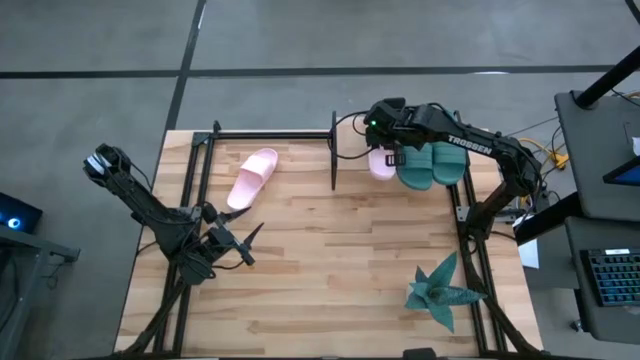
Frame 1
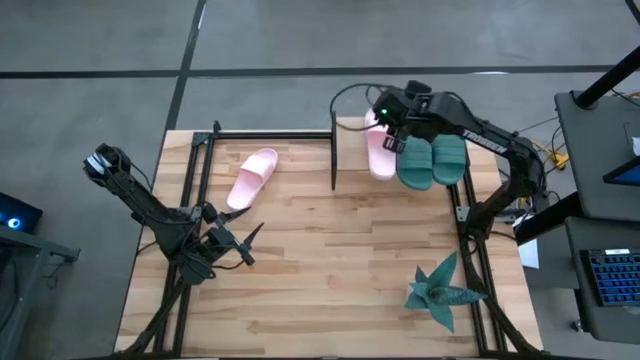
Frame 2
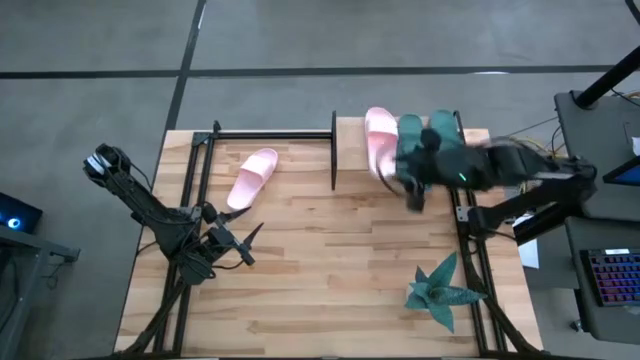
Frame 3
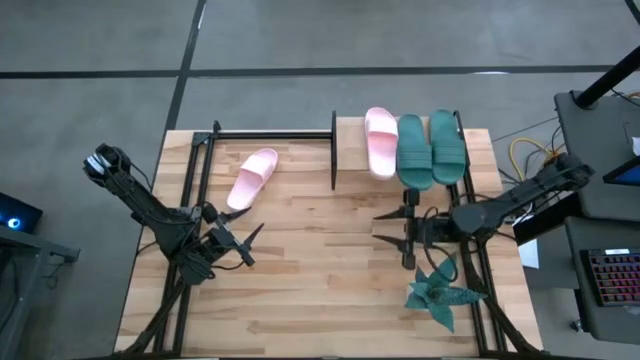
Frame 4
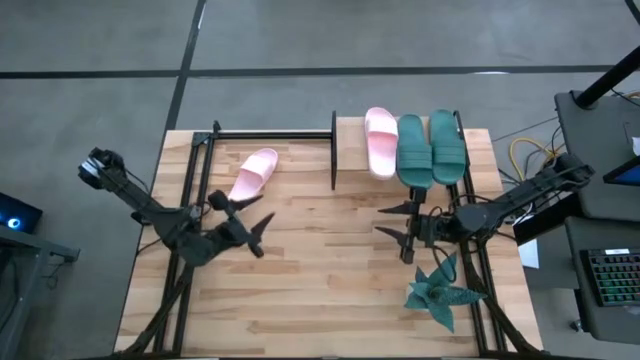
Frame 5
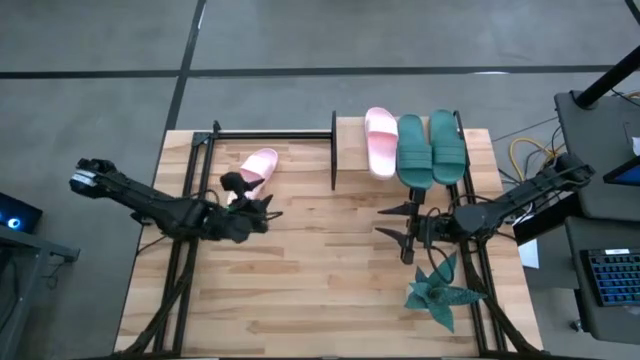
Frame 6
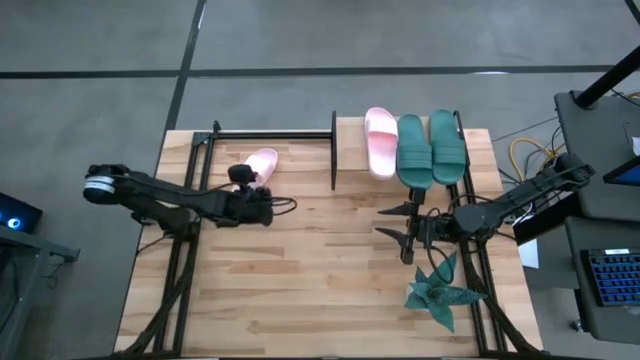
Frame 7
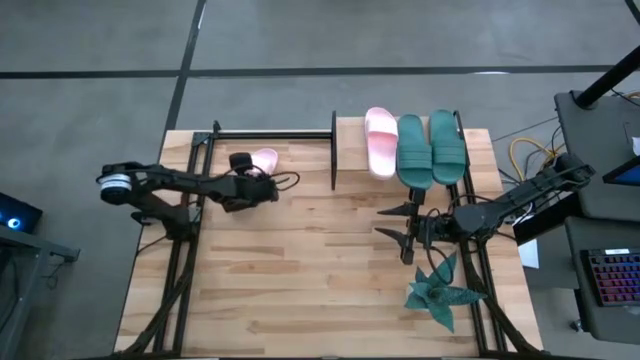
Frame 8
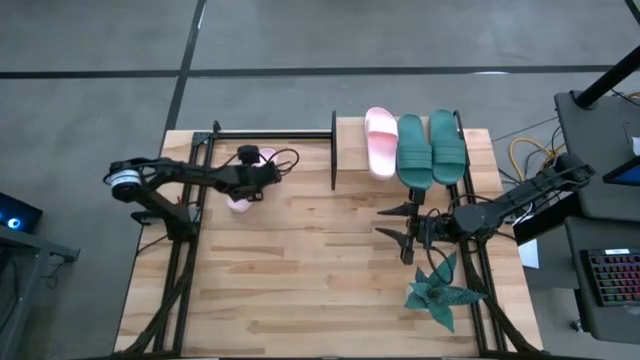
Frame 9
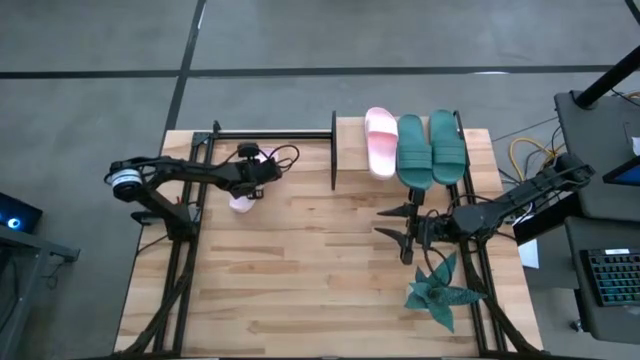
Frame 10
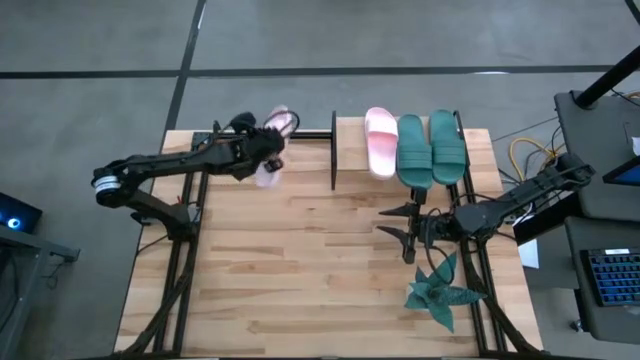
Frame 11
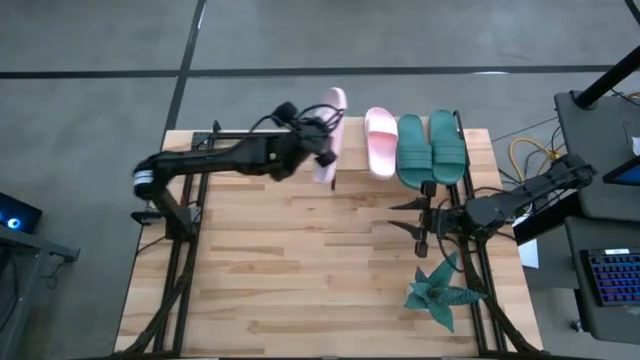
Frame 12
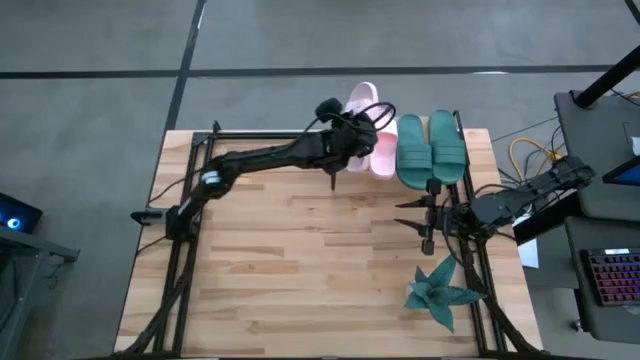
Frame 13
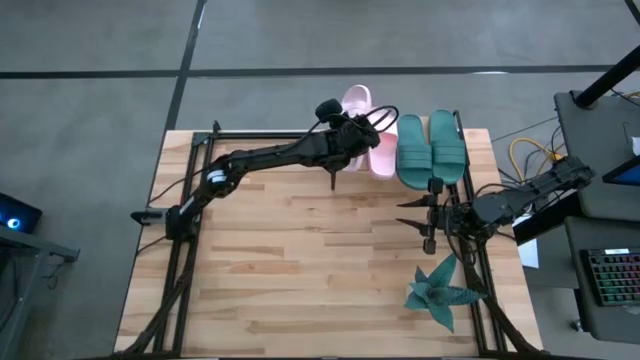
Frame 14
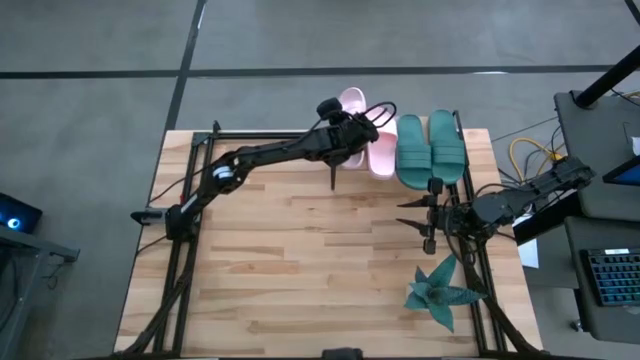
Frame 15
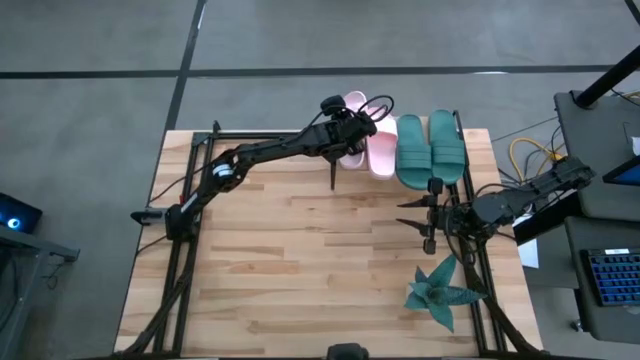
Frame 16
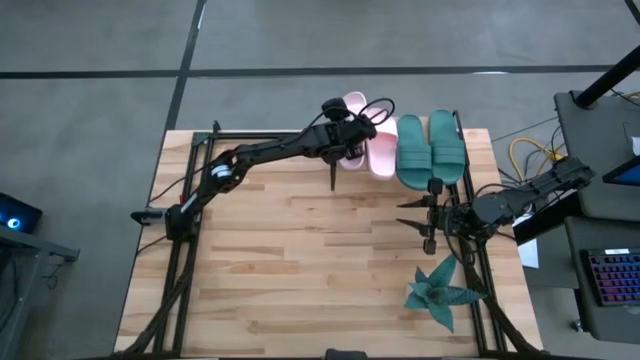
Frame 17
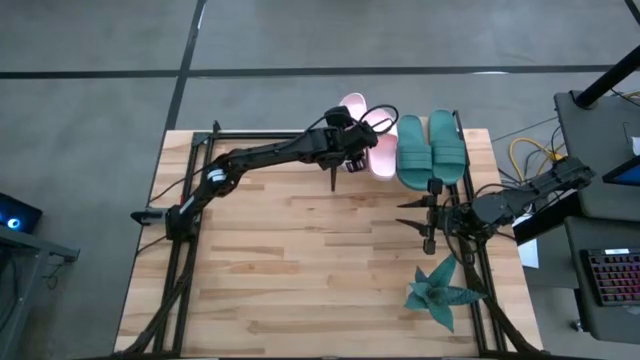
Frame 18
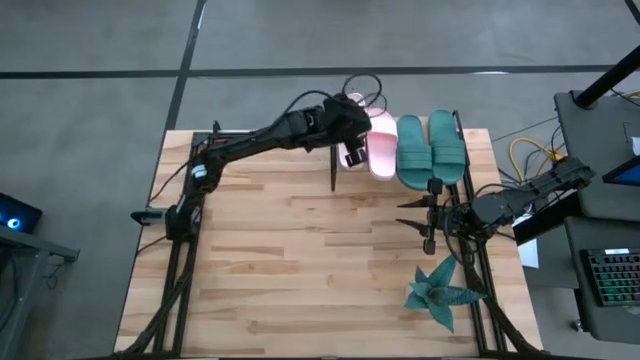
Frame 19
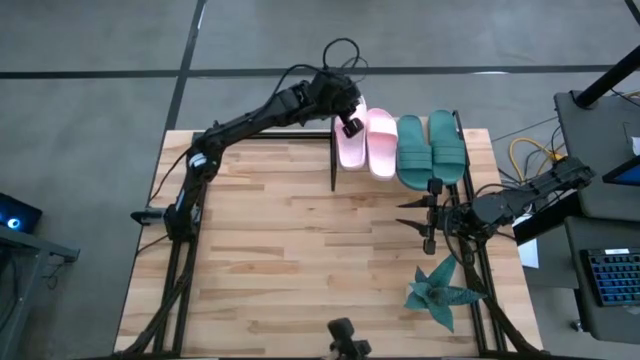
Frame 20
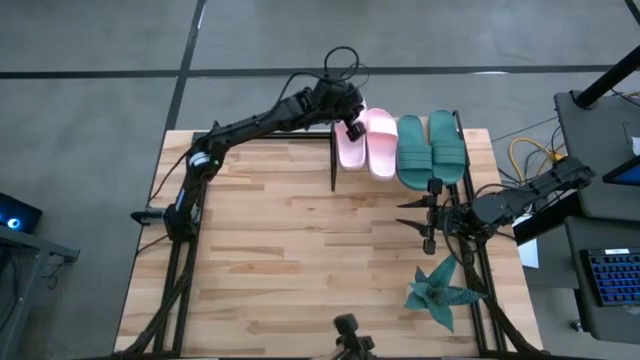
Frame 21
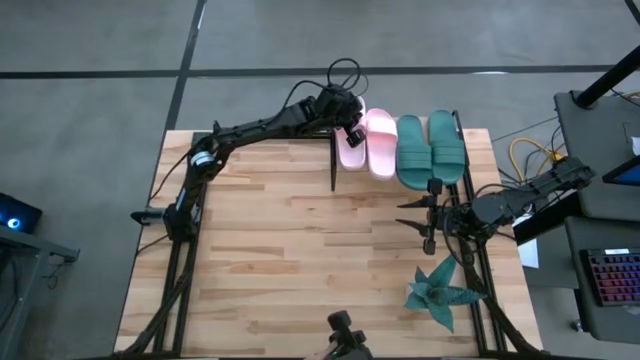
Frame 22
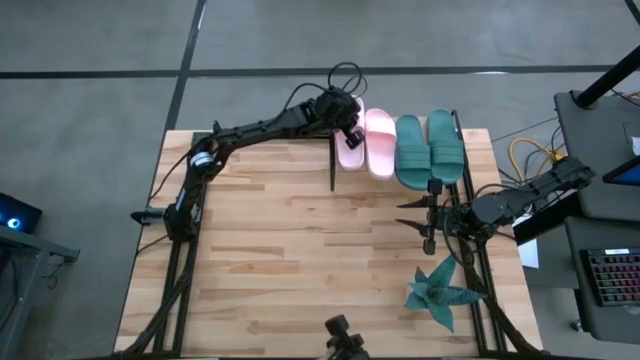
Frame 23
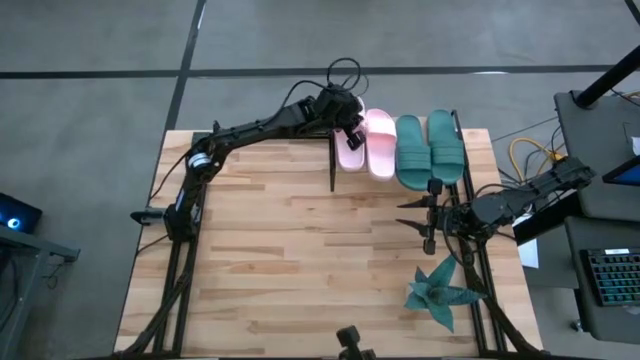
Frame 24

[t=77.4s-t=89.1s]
Task: Pick and place slides into the shelf
Put the pink slide on the shelf

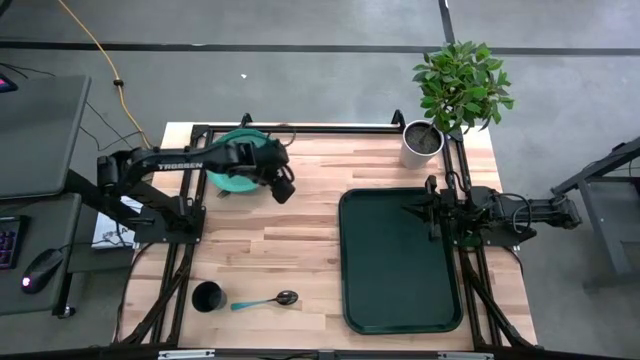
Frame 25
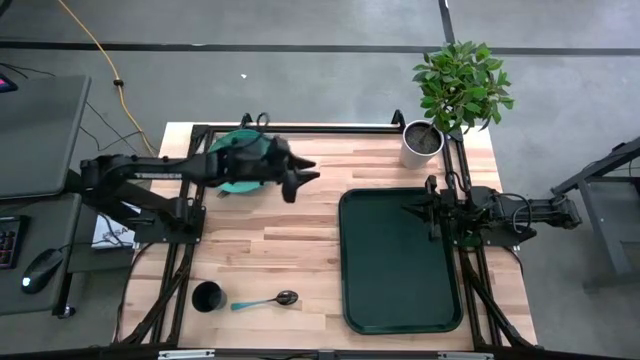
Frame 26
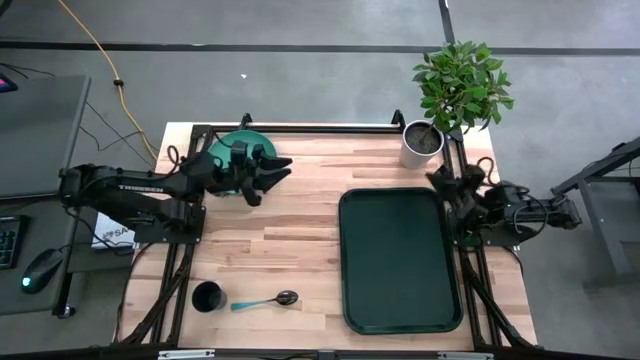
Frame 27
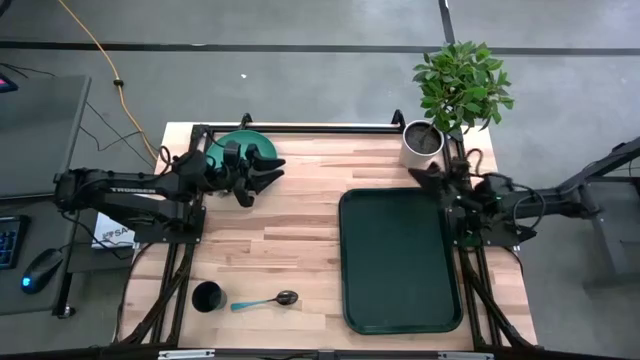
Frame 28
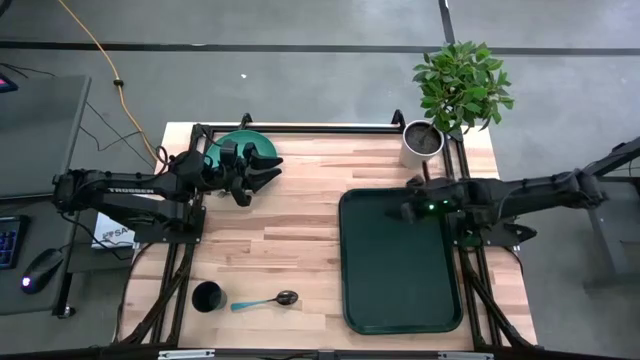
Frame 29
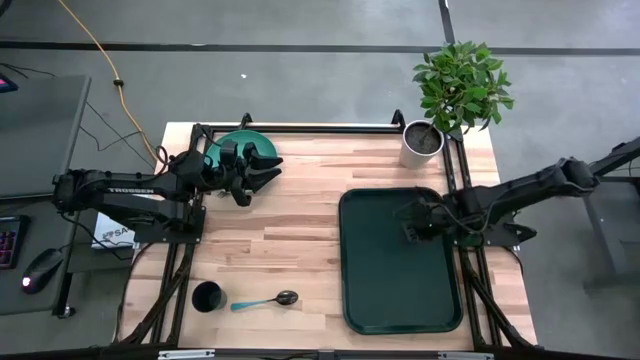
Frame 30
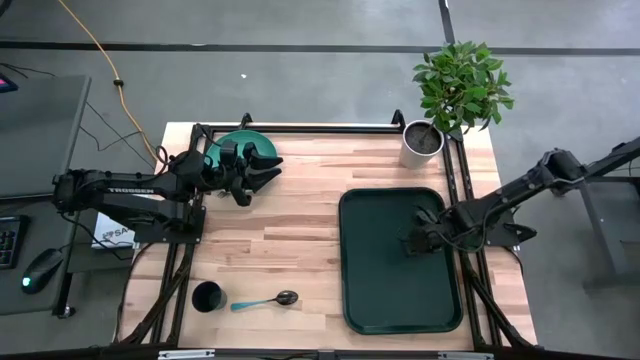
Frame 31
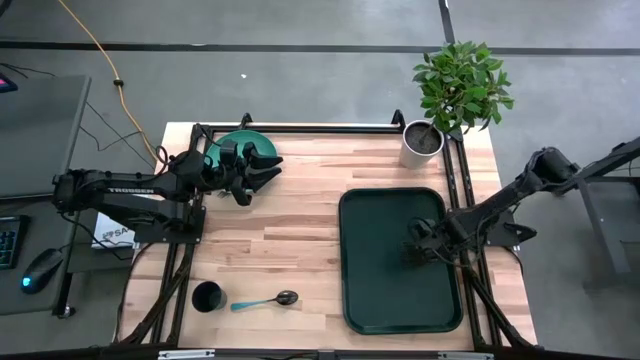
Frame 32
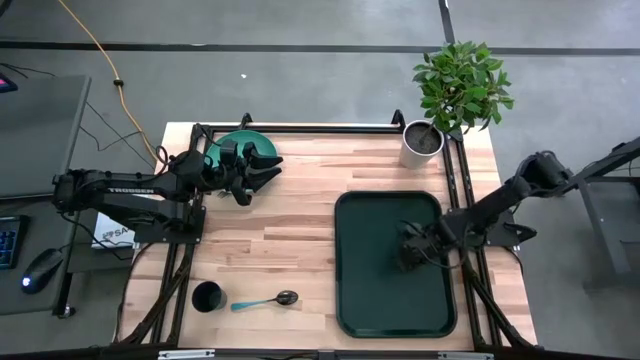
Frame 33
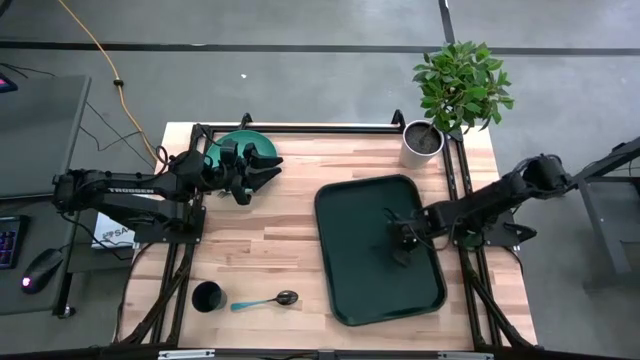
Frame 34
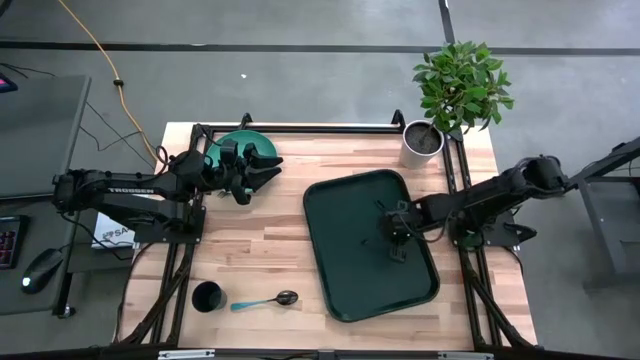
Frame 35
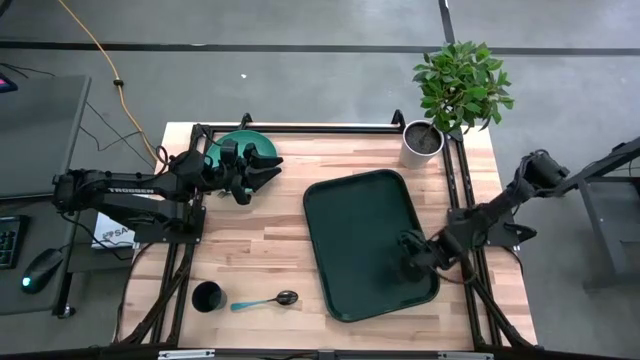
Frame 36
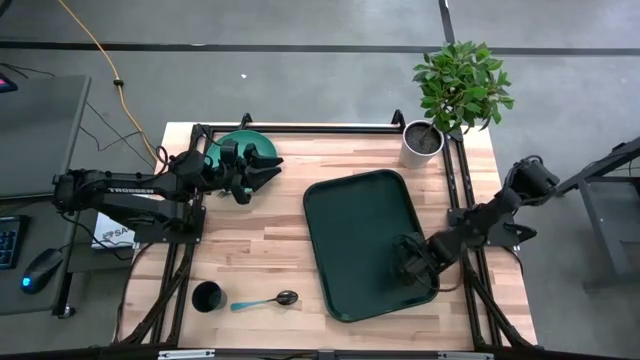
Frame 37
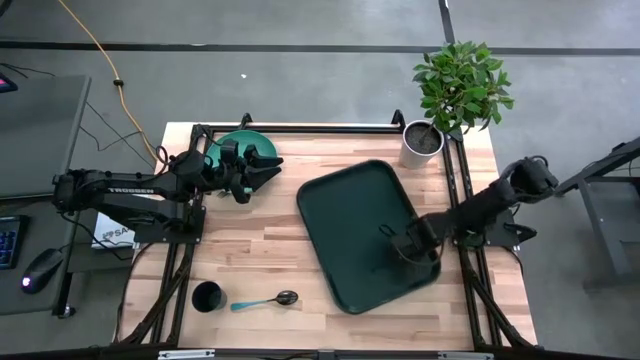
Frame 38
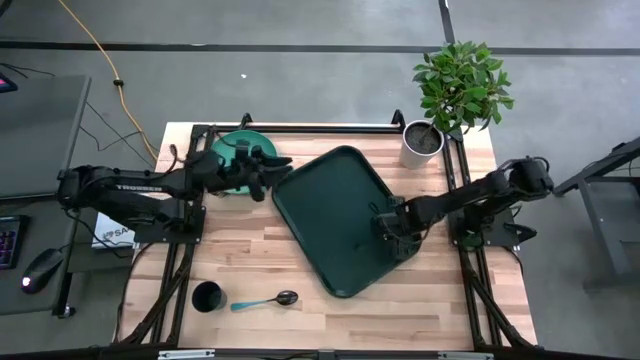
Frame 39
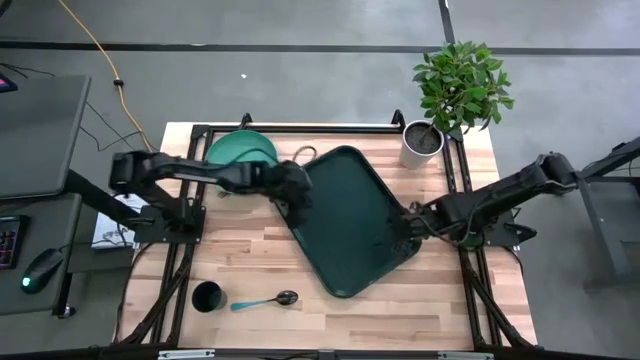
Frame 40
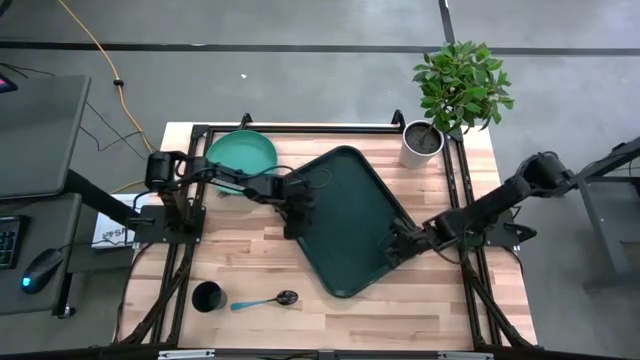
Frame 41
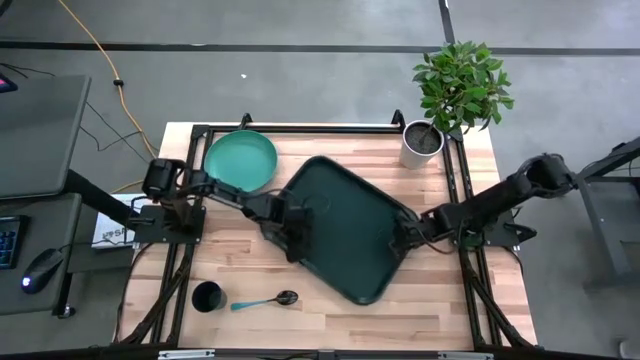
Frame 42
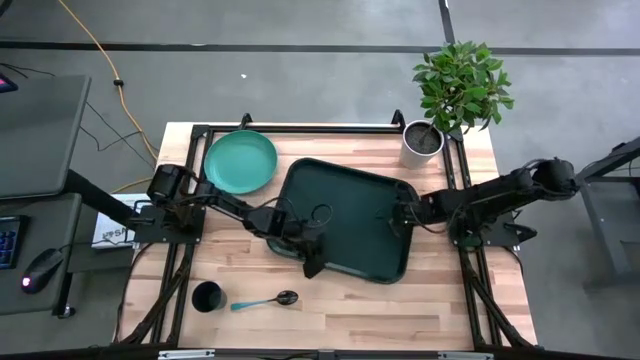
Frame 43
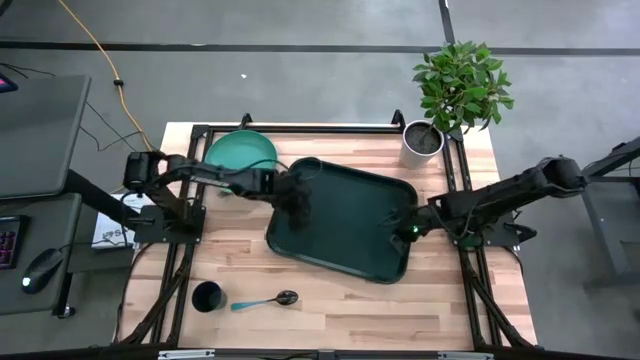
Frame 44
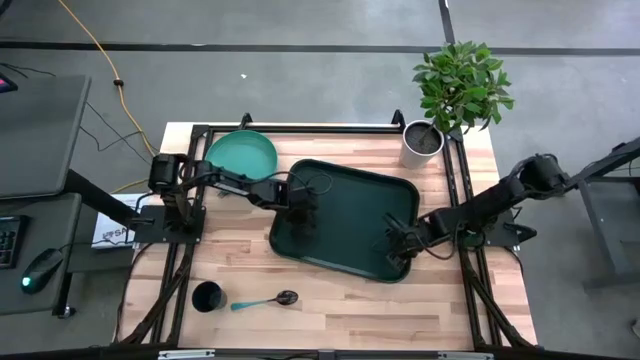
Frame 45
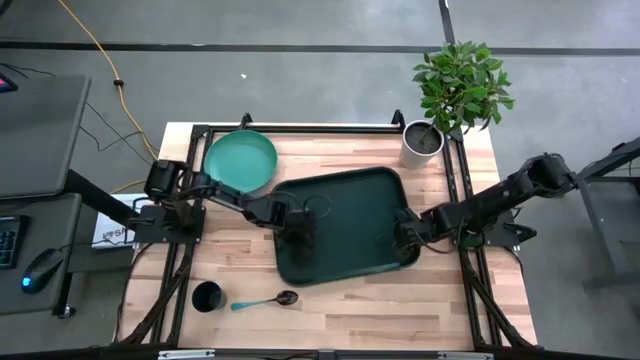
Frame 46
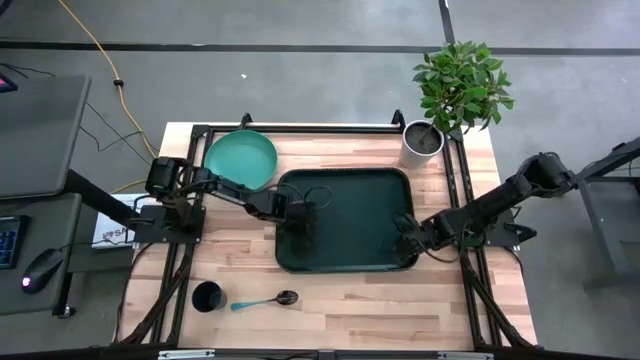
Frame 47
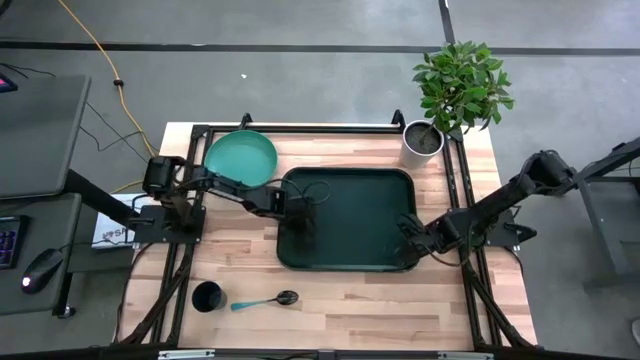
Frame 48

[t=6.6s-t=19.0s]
Task: Pick and place plate/cup/fork/spoon on tray
Move the green tray to the center of the table
